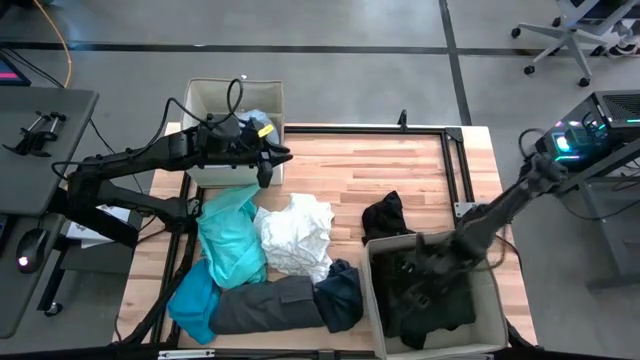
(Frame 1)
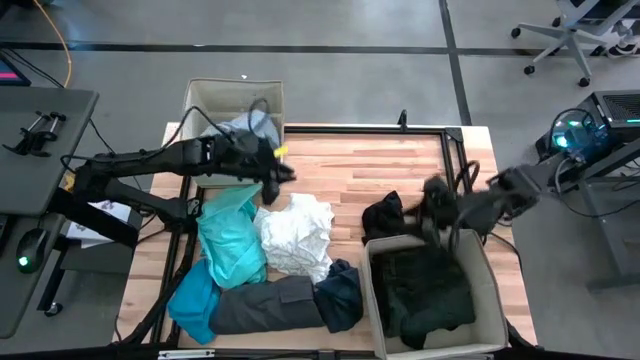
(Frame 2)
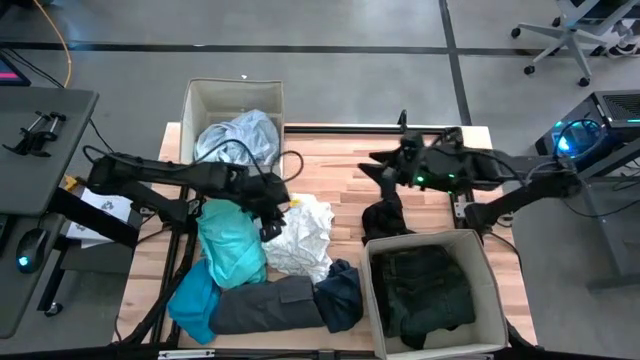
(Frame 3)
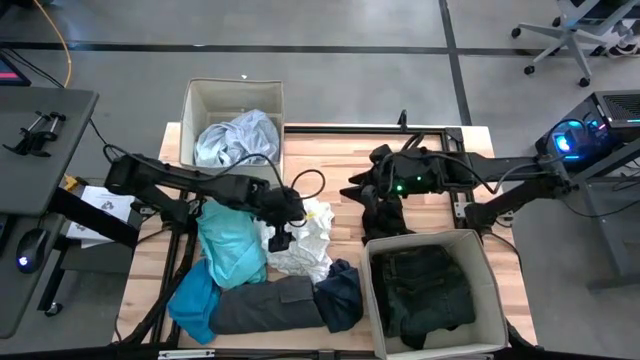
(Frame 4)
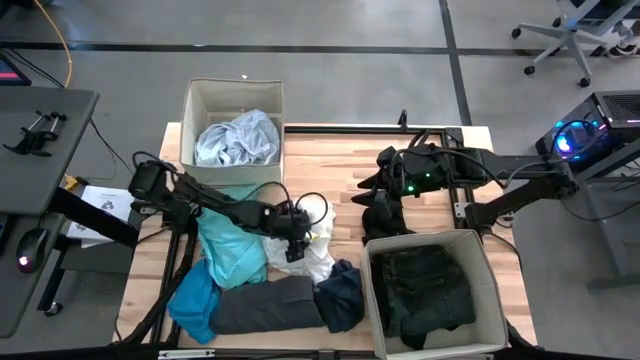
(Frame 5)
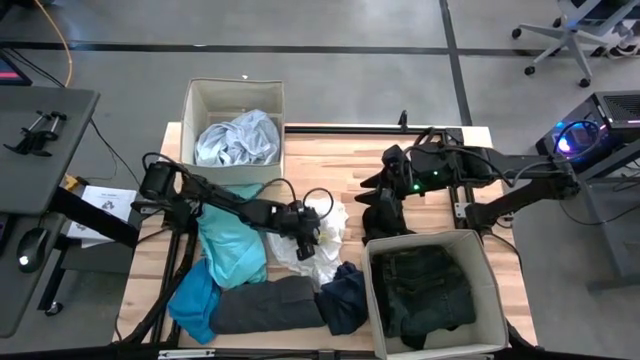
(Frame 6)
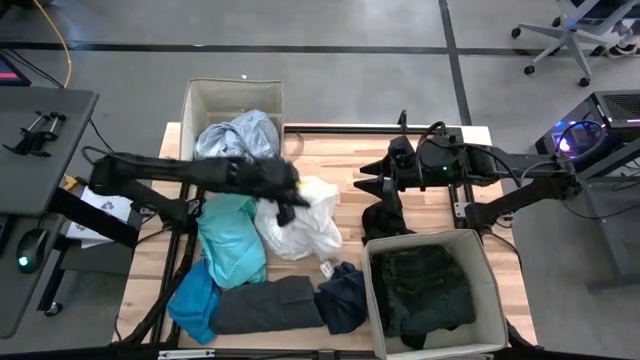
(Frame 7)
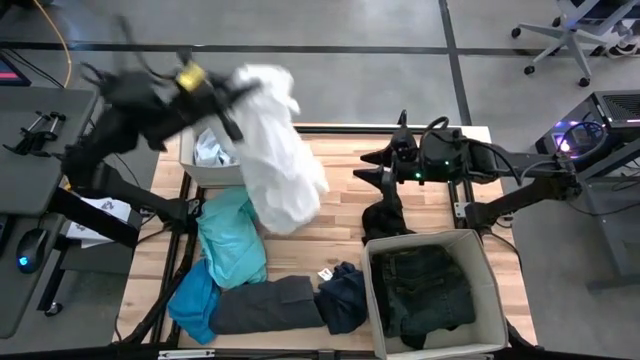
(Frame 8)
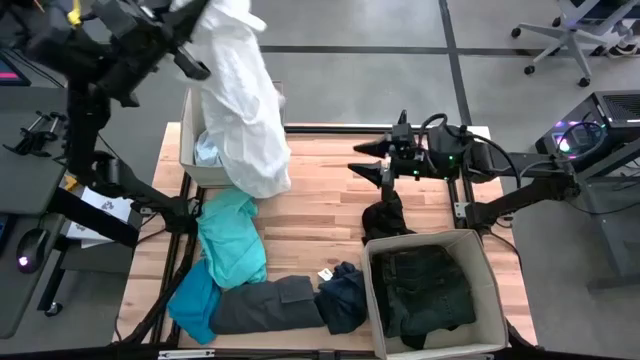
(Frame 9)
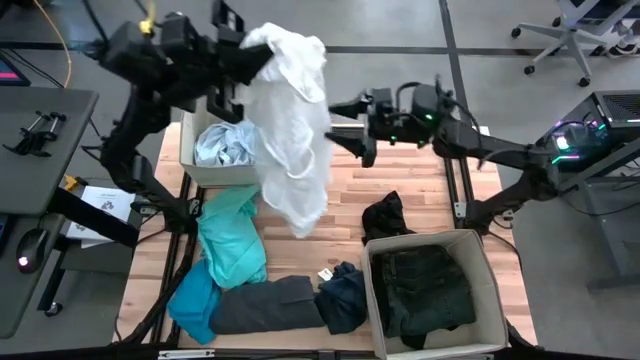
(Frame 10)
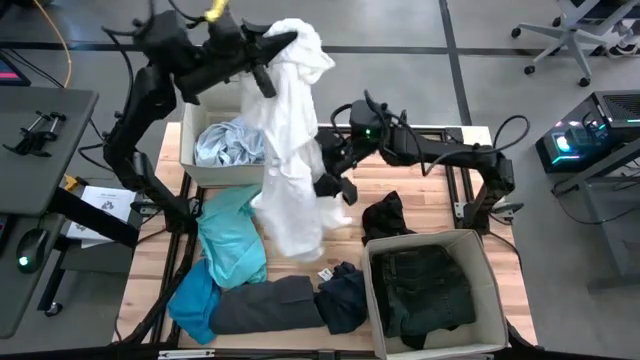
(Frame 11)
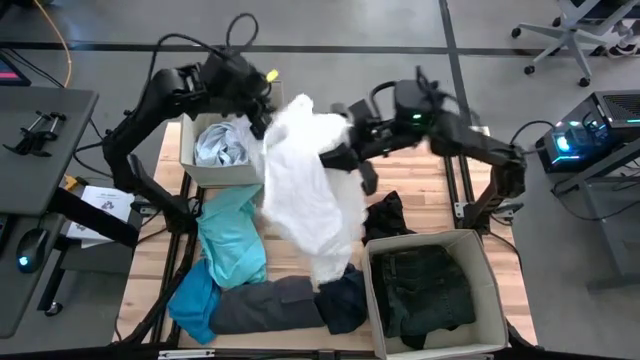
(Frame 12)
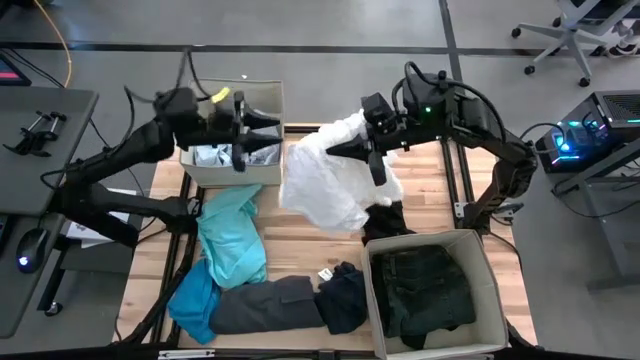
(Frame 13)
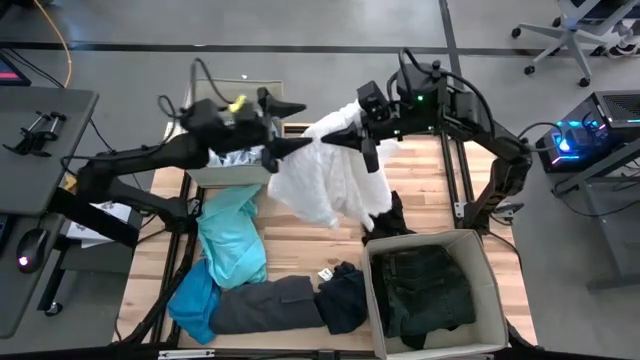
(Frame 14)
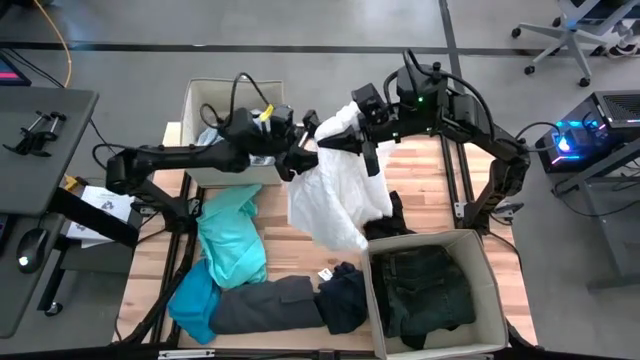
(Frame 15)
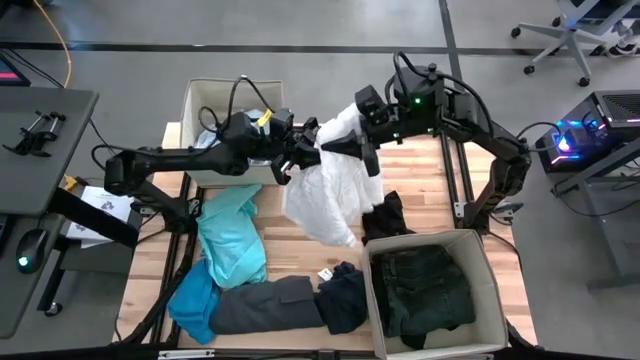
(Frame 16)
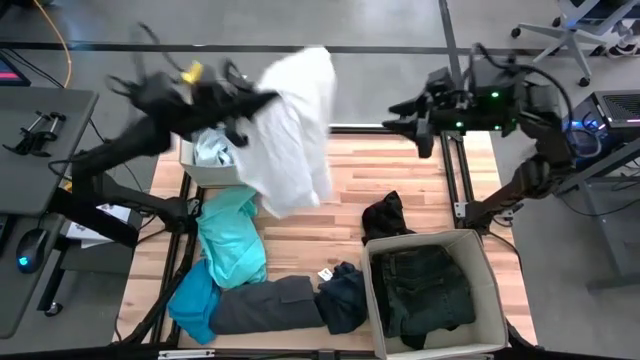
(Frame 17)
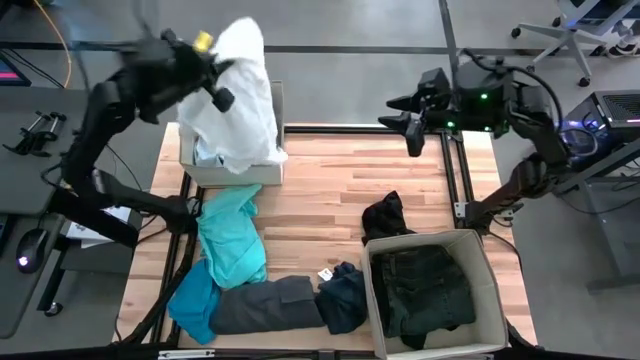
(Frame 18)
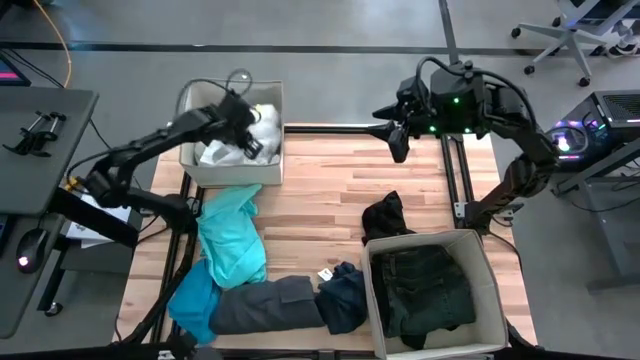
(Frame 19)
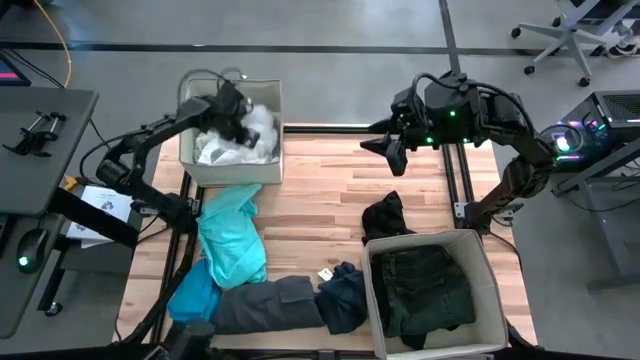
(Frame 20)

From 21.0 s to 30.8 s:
Task: Sort clothes
Put the white shirt into the top laundry organizer

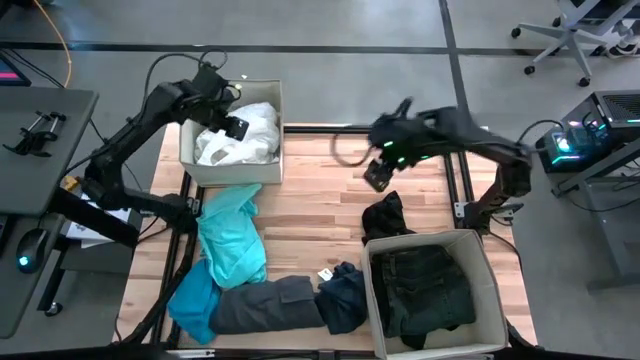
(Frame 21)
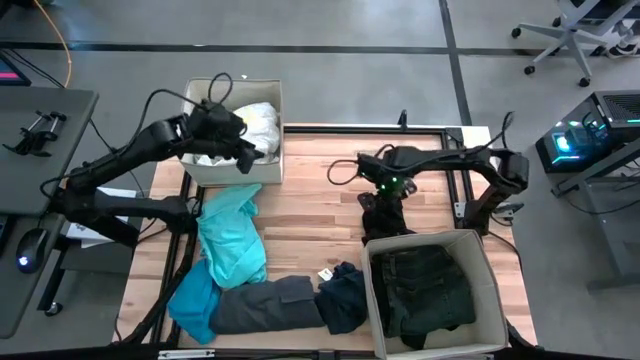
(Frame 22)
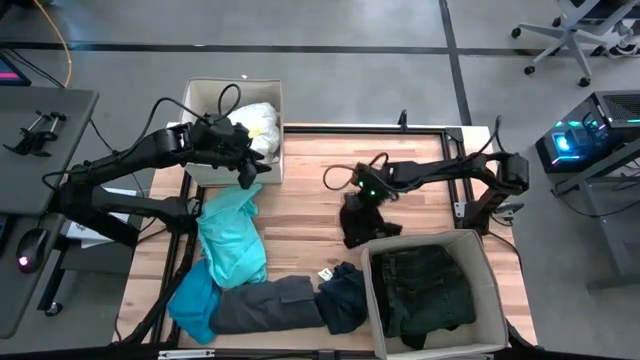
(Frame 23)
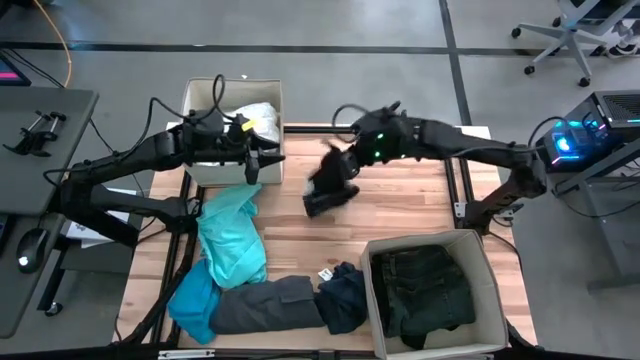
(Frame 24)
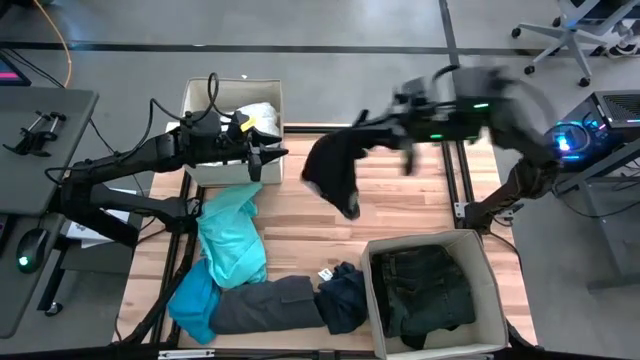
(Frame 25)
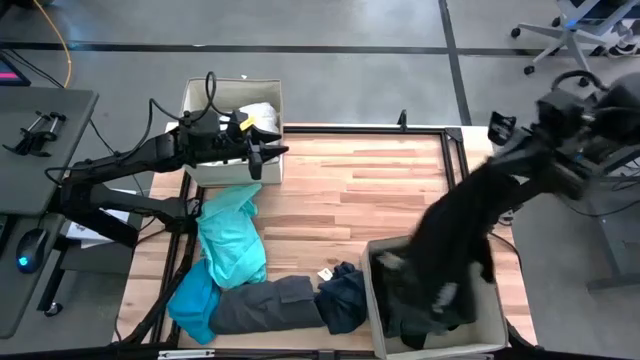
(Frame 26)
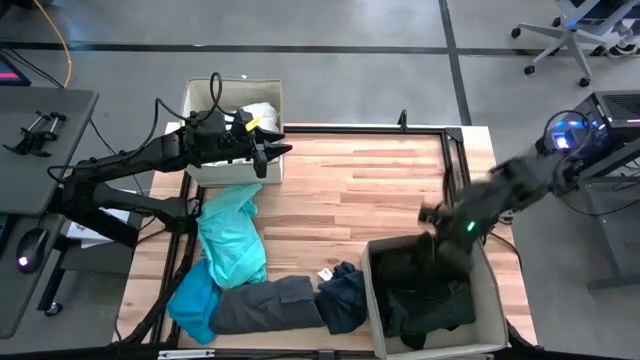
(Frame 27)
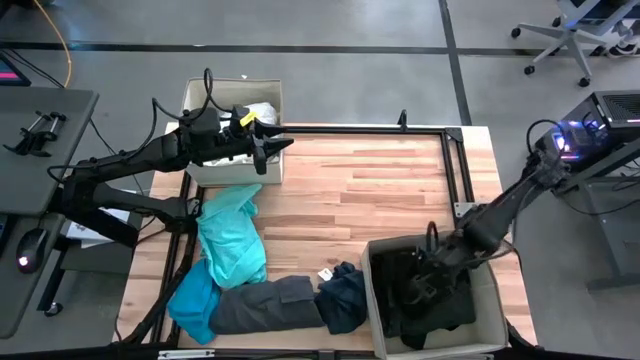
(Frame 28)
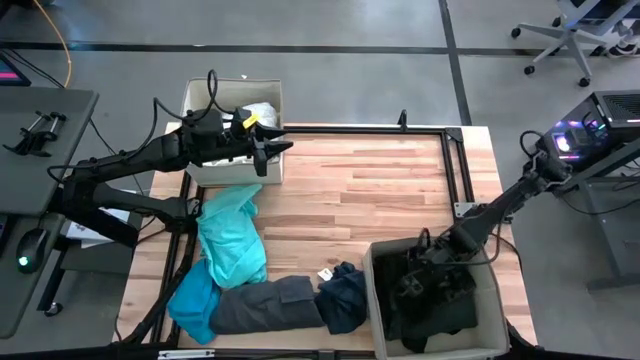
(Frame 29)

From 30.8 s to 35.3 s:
Put the black shorts into the bottom laundry organizer

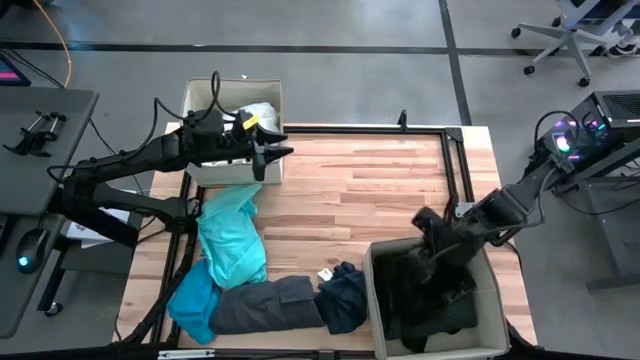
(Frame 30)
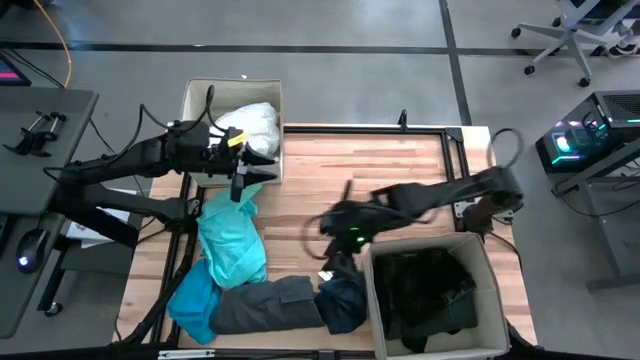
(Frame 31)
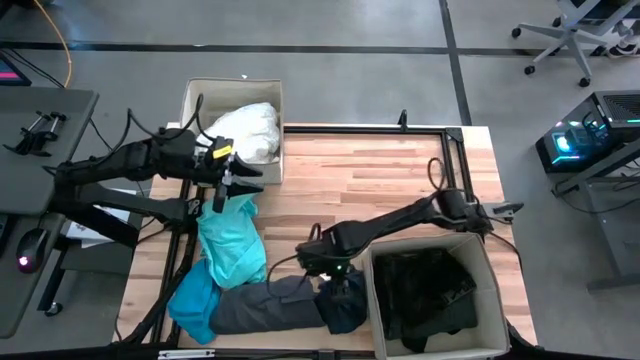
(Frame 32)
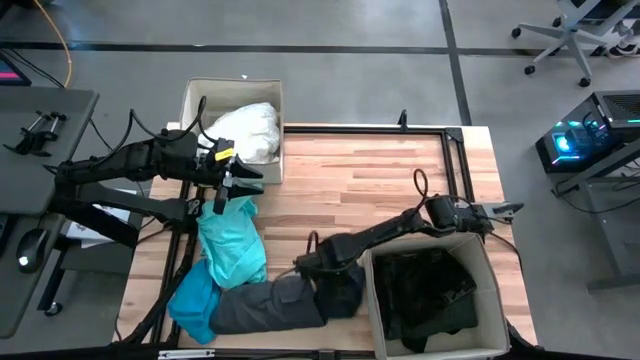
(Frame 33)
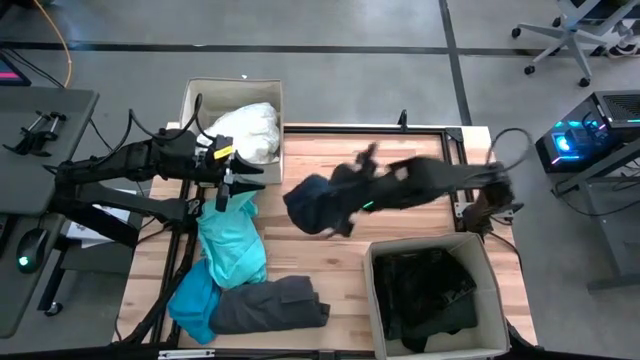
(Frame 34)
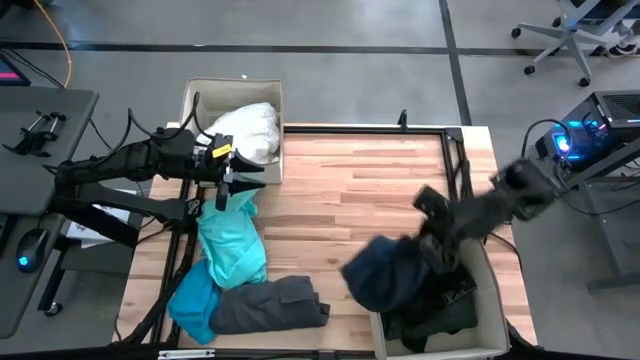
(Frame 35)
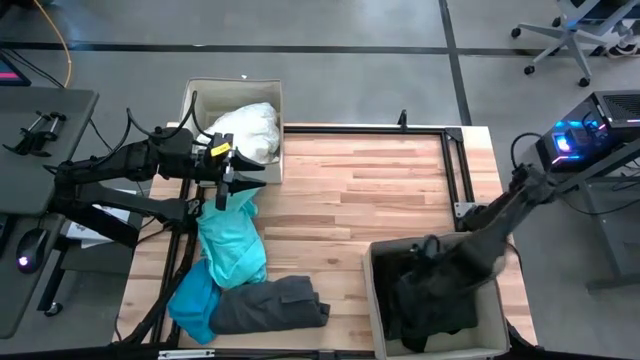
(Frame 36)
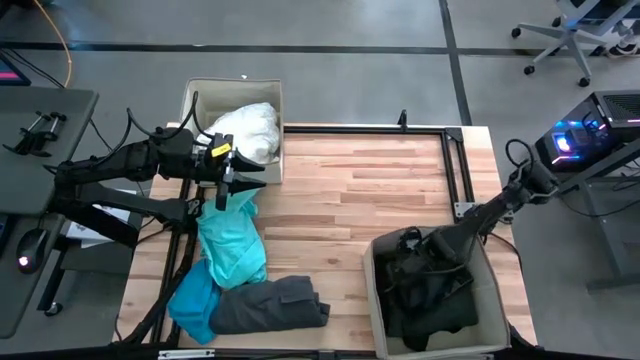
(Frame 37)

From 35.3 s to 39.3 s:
Put the dark blue shorts into the bottom laundry organizer

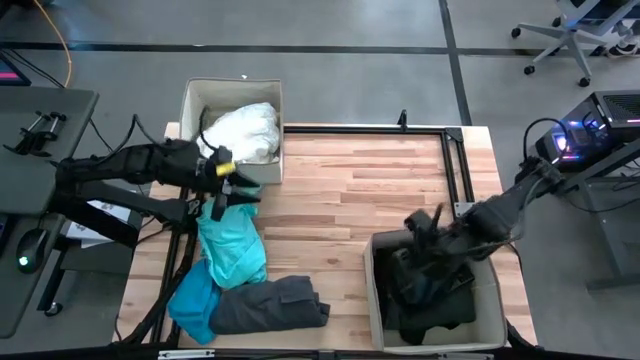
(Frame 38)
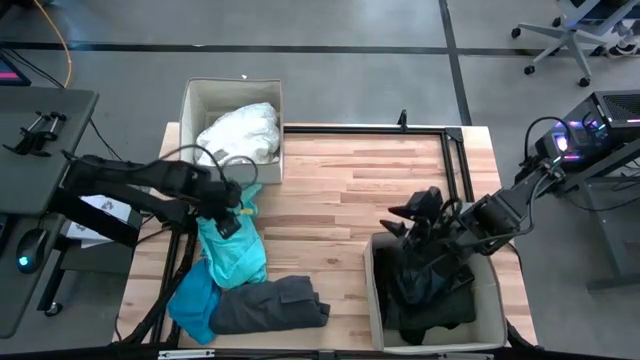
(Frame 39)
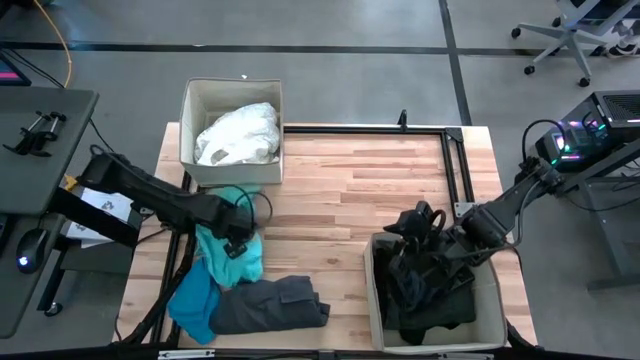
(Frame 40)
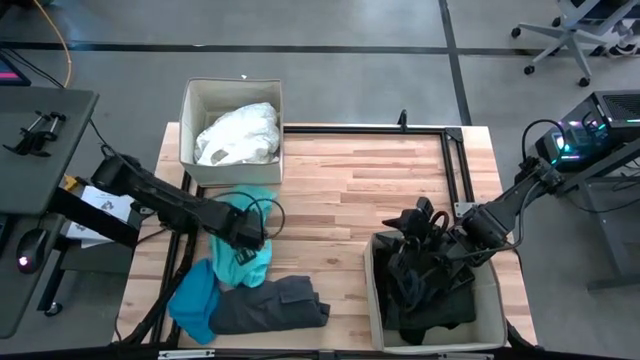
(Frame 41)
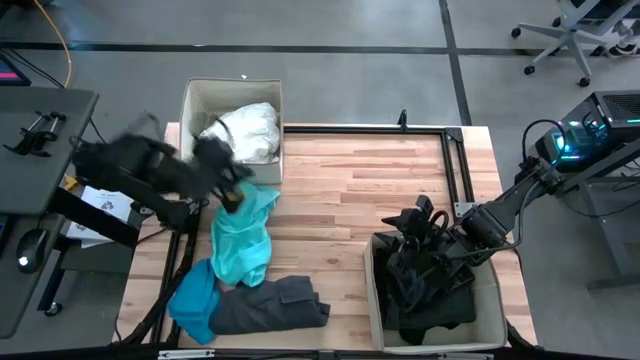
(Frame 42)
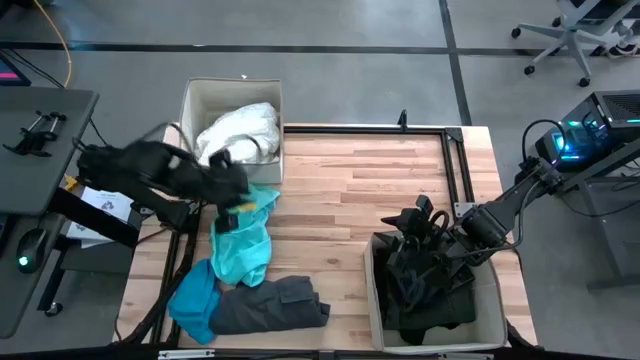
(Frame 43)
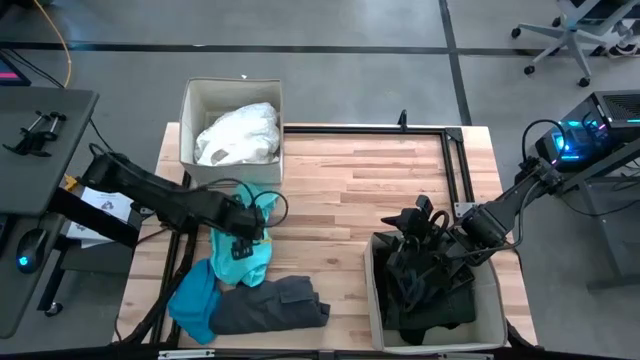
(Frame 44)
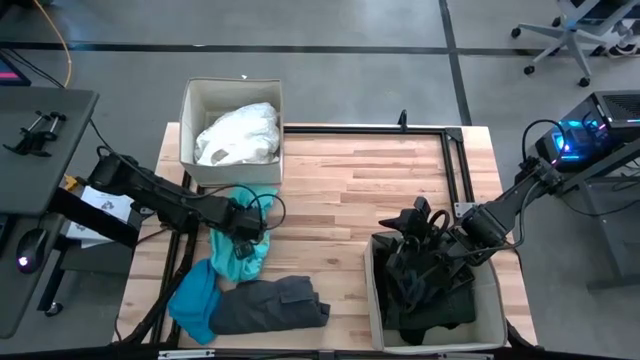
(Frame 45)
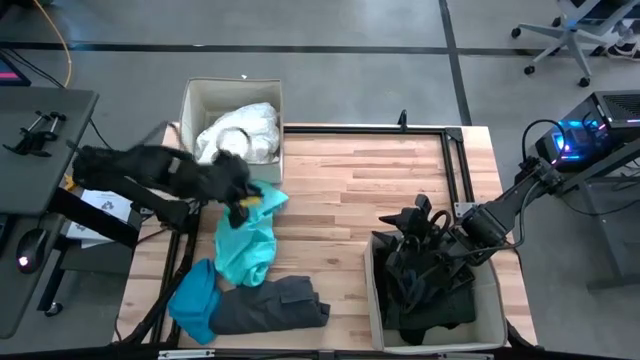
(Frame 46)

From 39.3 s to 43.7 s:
Put the light blue shorts into the top laundry organizer
